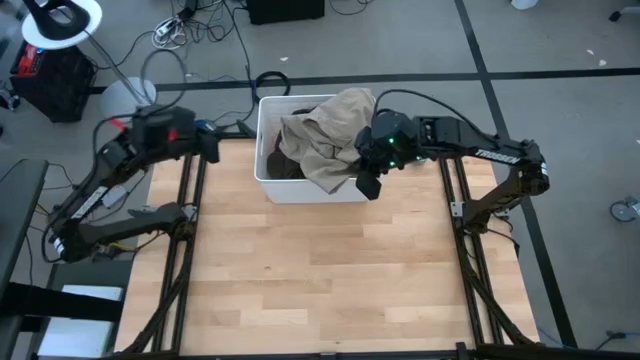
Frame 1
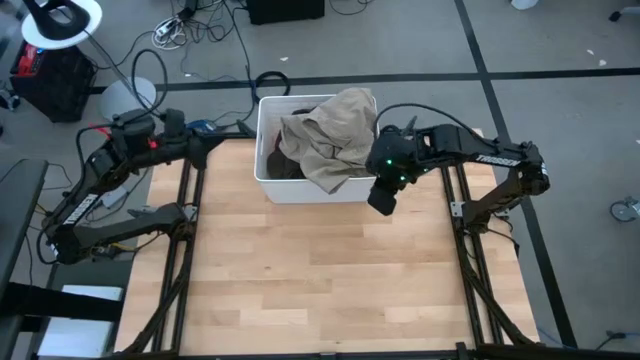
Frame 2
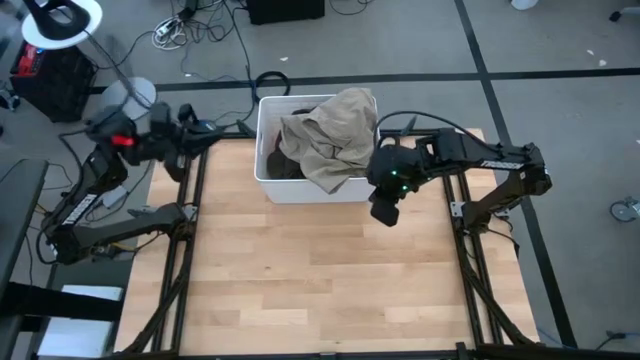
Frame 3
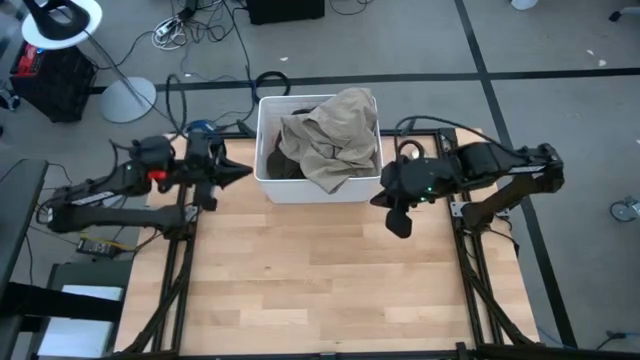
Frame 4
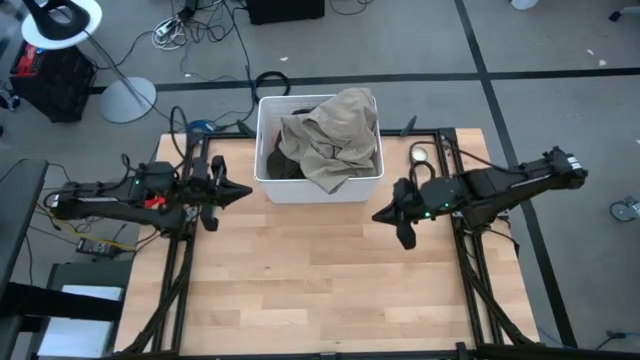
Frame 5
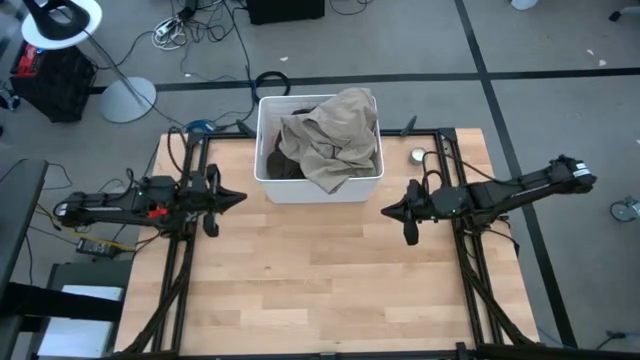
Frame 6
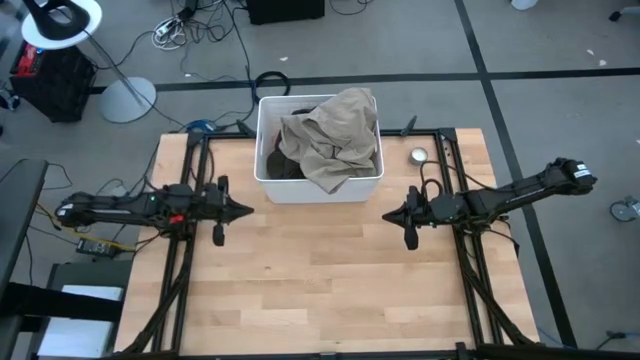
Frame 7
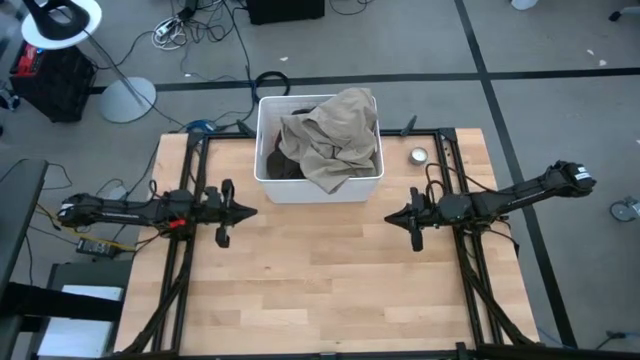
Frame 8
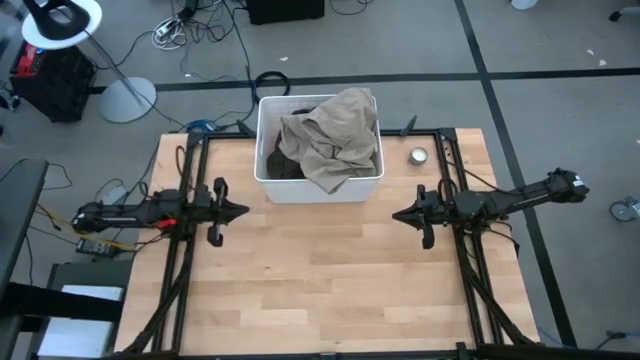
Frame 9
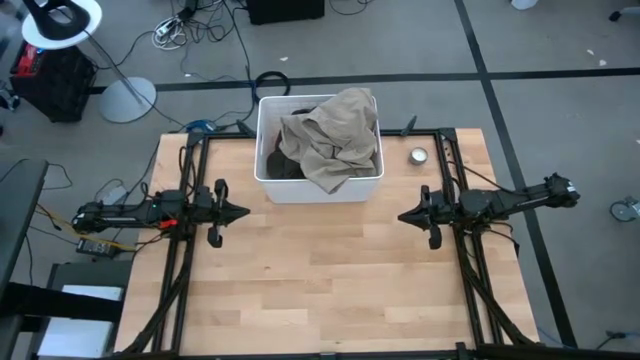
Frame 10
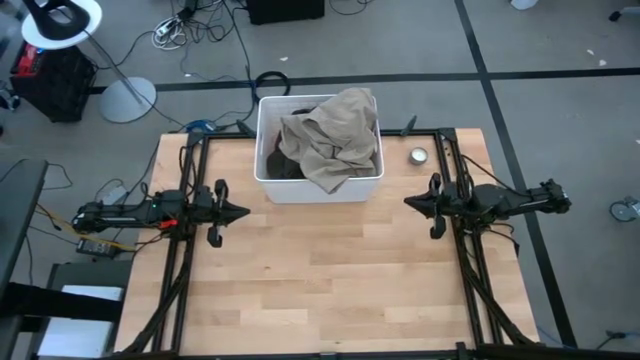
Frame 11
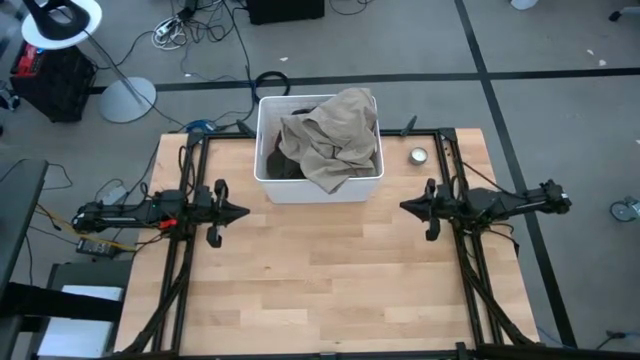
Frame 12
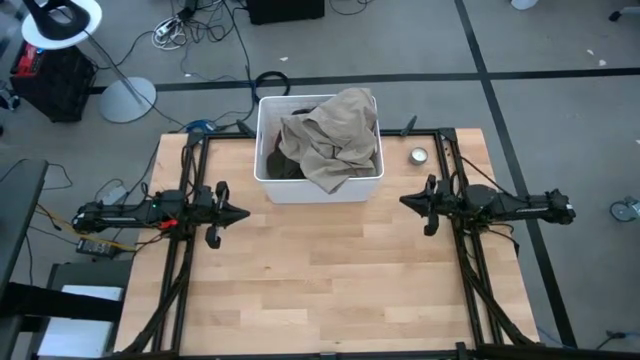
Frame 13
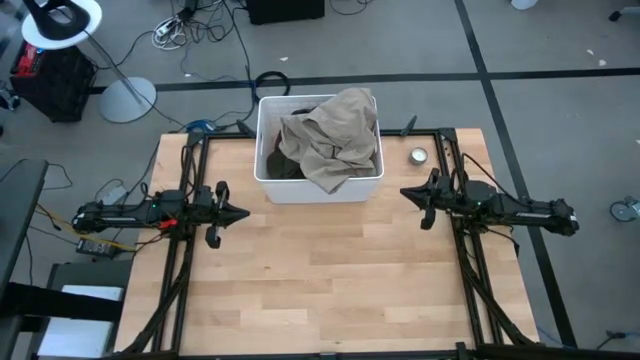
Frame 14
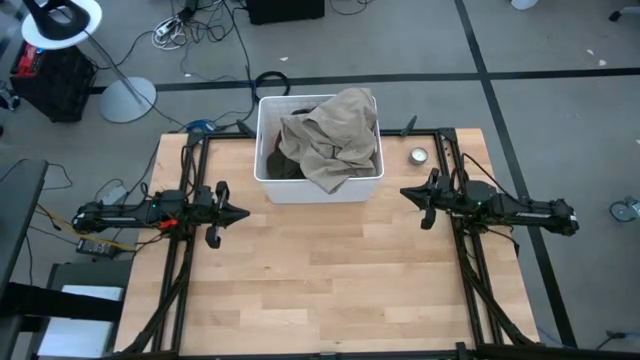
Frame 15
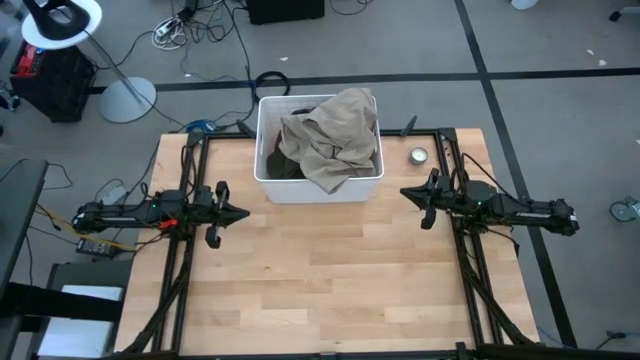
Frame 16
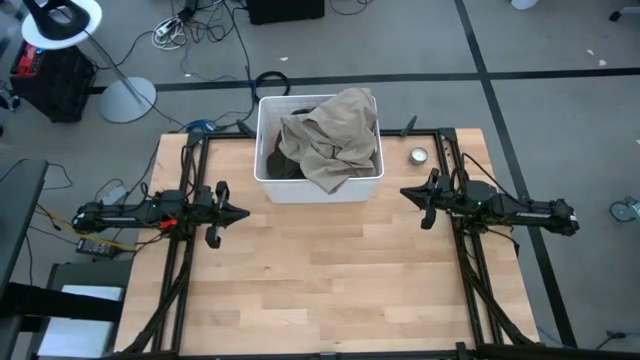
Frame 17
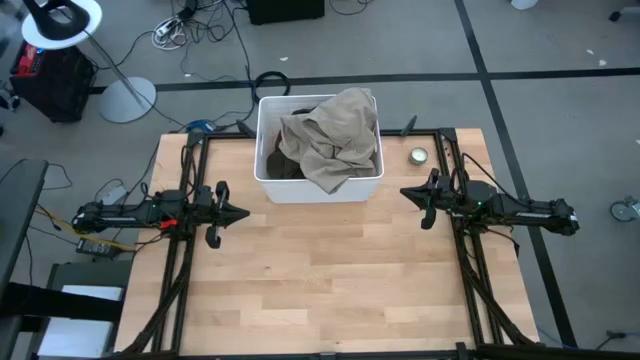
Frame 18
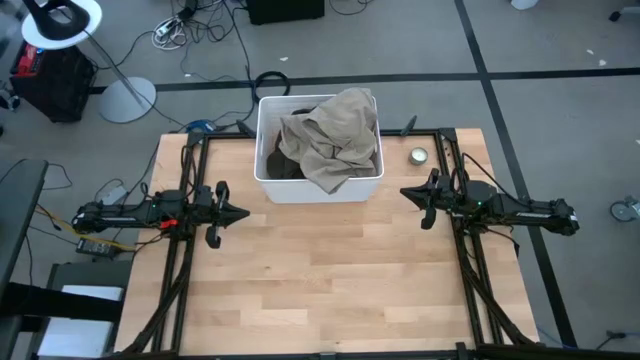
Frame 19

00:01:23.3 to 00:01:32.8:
Task: Sort clothes
Return to Home Position

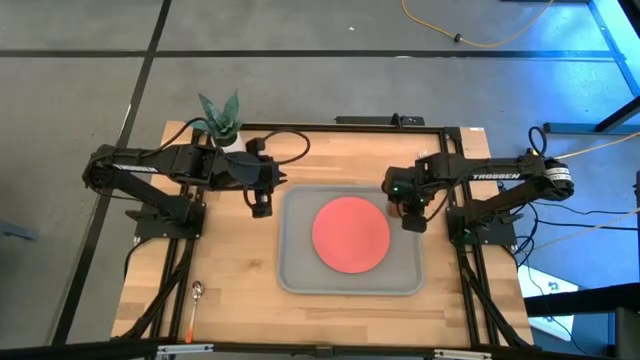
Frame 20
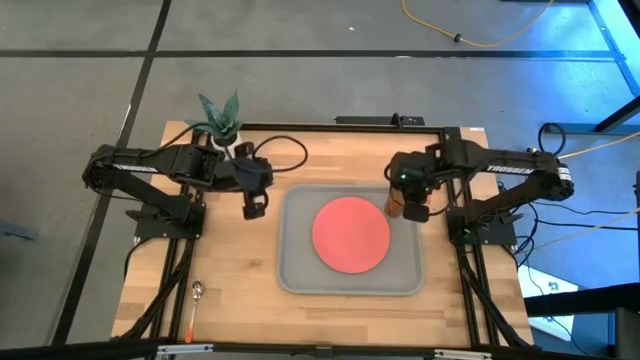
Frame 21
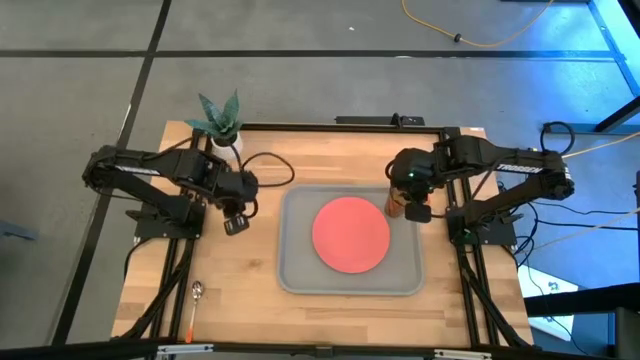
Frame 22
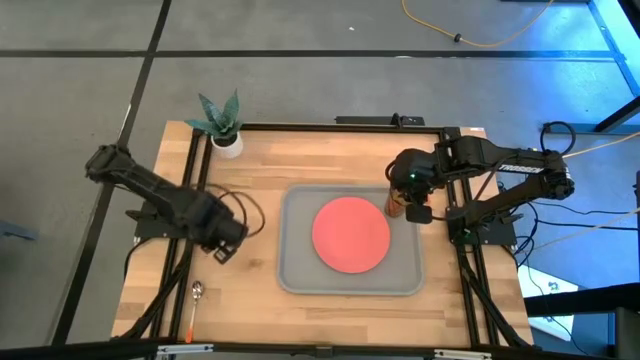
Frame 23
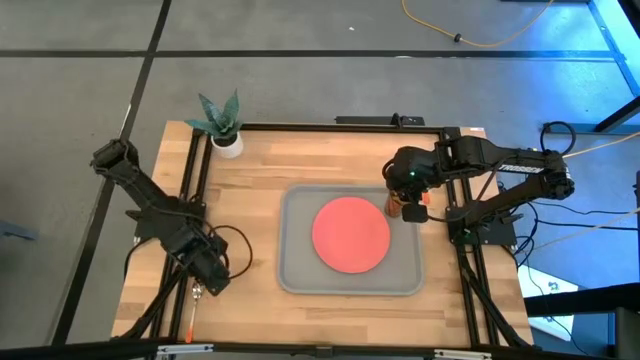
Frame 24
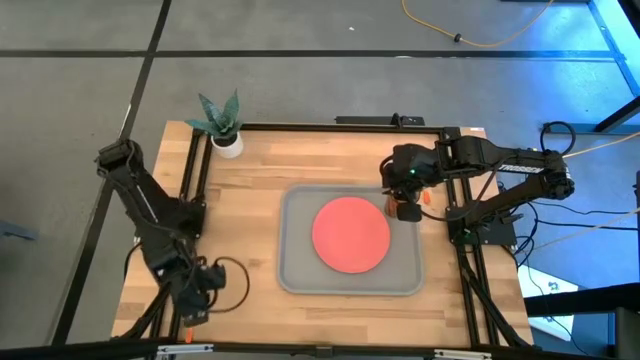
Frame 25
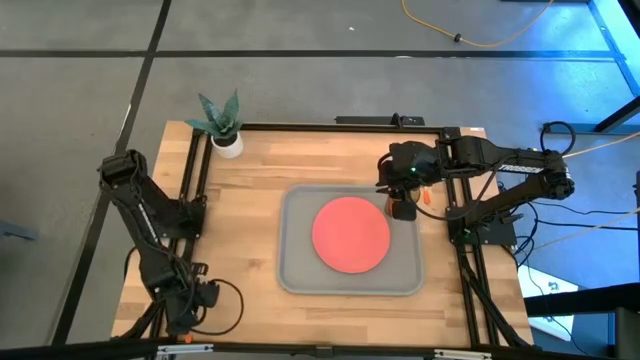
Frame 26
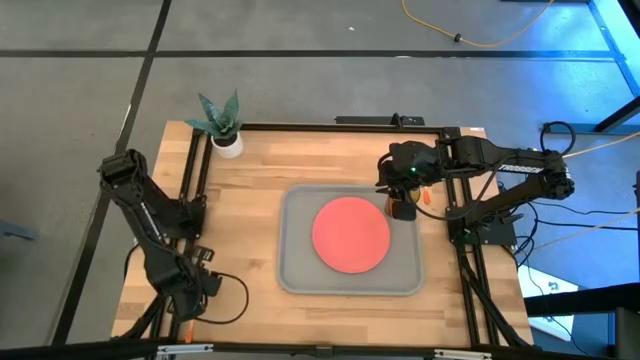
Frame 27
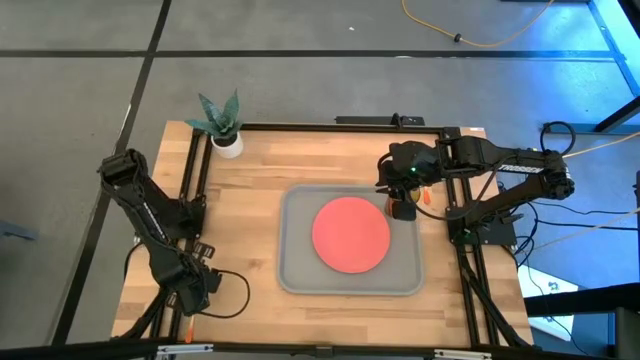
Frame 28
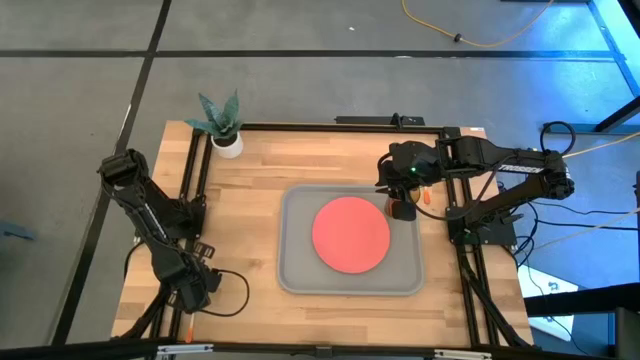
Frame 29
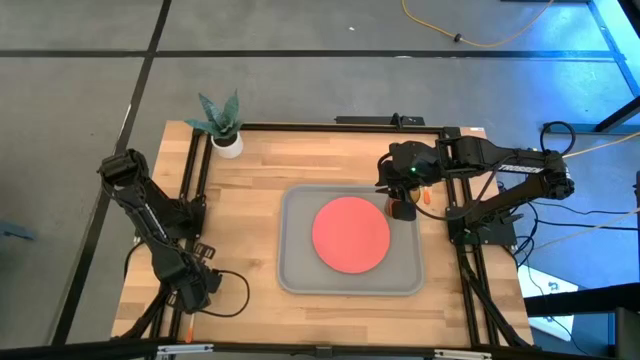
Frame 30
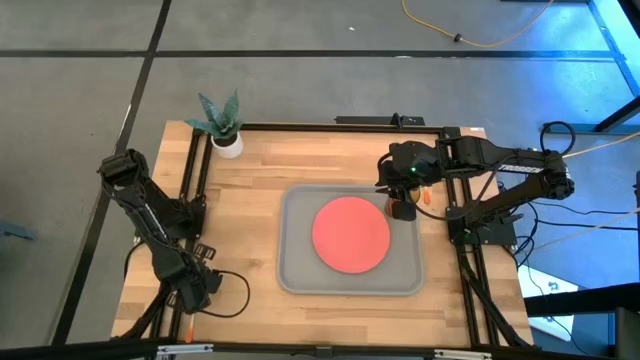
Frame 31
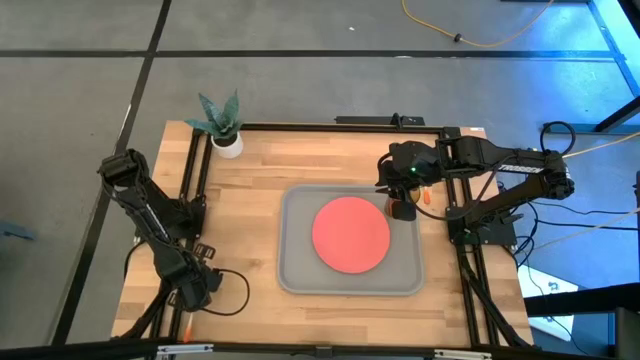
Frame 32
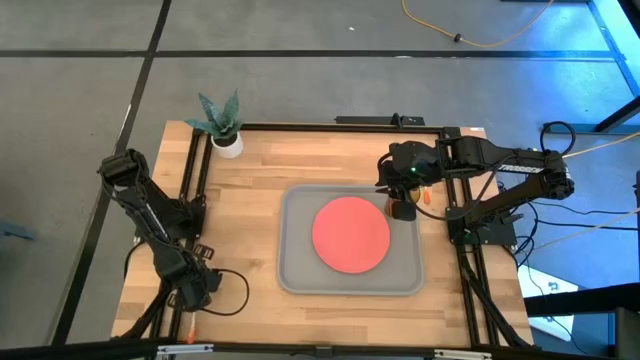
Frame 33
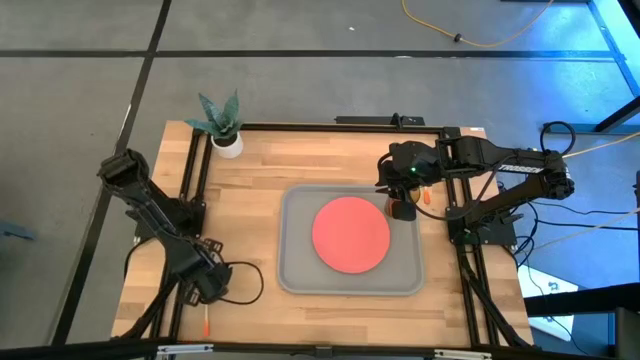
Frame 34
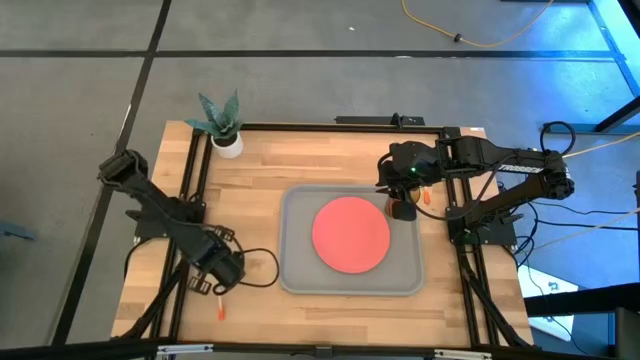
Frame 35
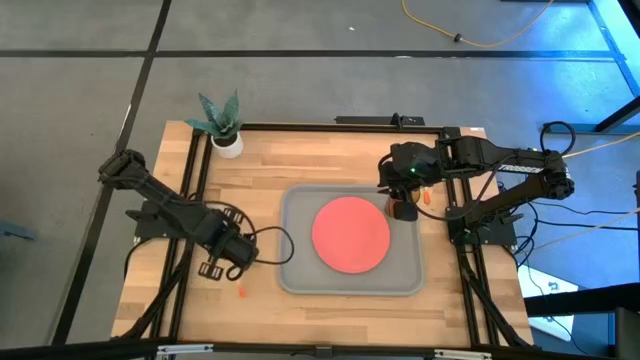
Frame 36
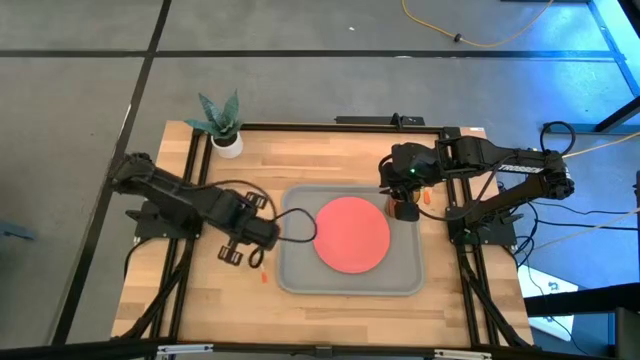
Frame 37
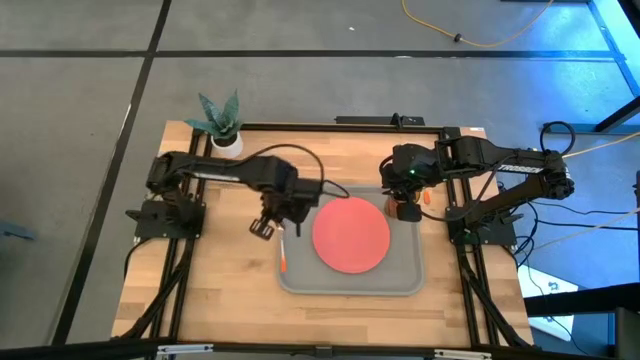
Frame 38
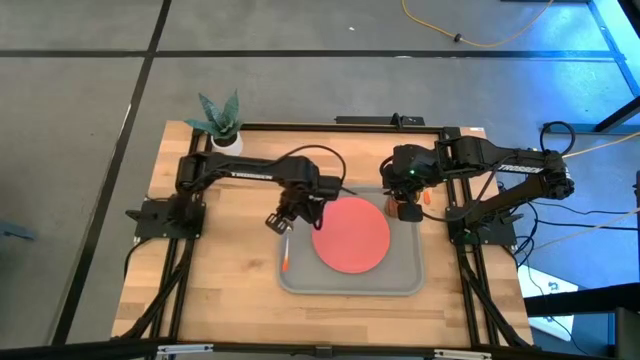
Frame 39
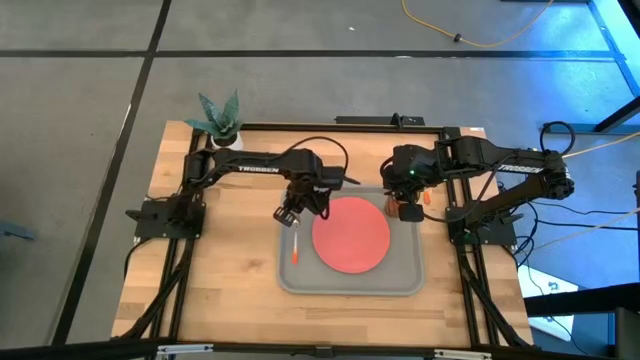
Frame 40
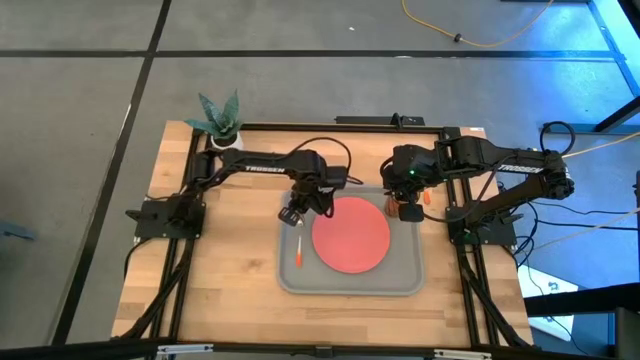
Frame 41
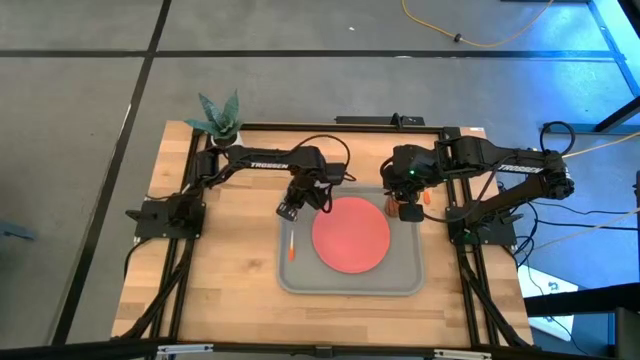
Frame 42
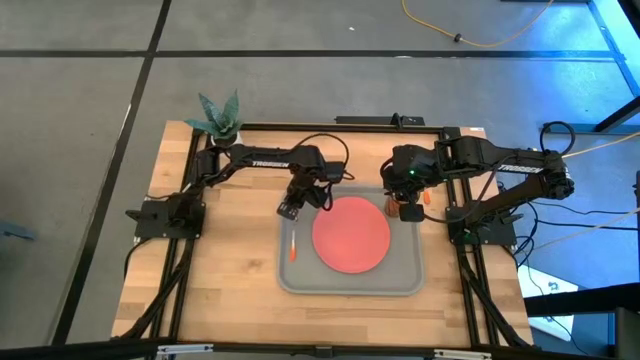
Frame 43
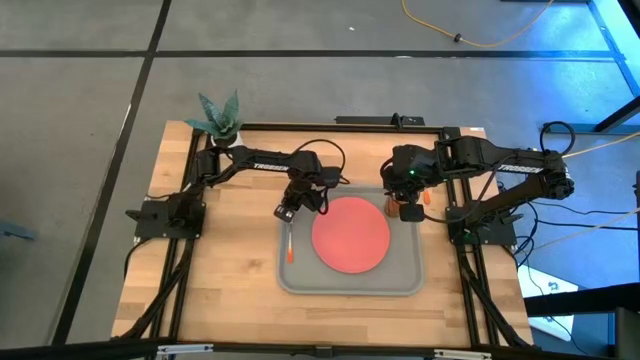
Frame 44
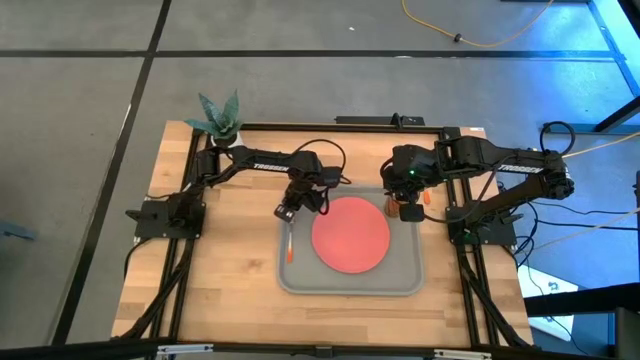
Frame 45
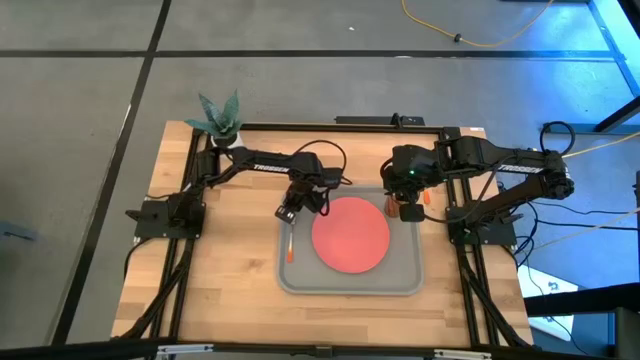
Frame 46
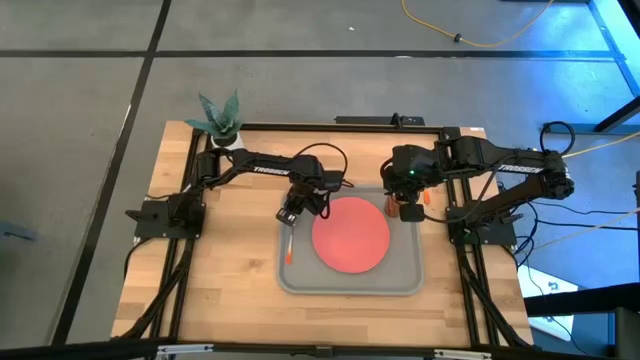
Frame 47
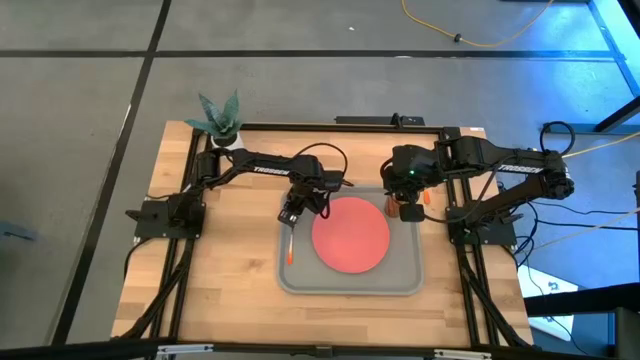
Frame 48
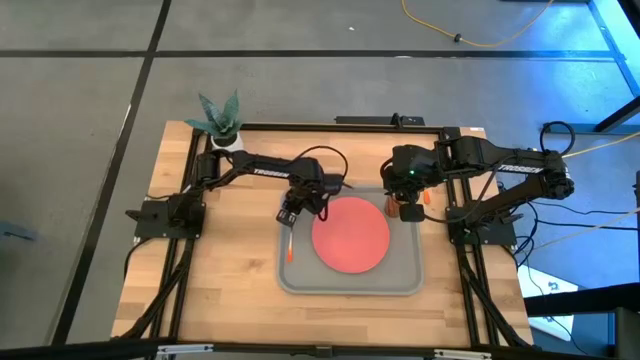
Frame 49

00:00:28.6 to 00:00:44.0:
Task: Pick and place plate/cup/fork/spoon on tray
Put the spoon on the left side of the serving tray
